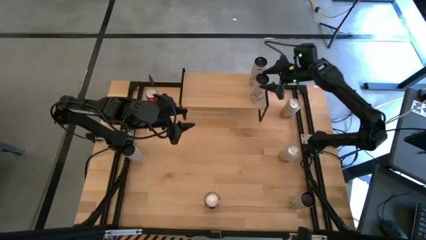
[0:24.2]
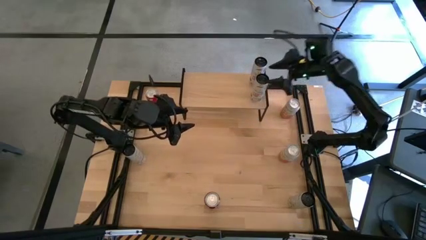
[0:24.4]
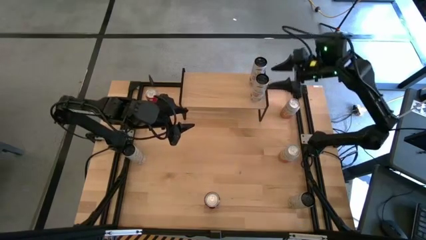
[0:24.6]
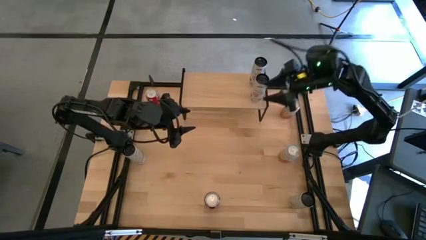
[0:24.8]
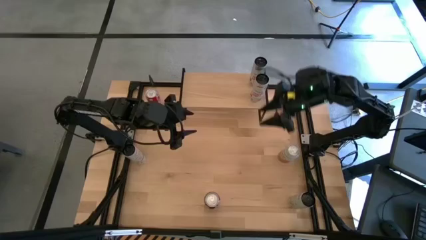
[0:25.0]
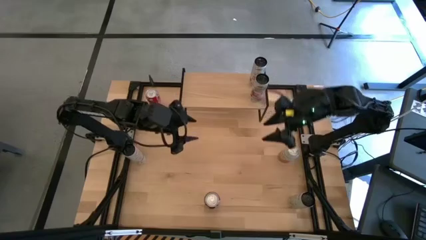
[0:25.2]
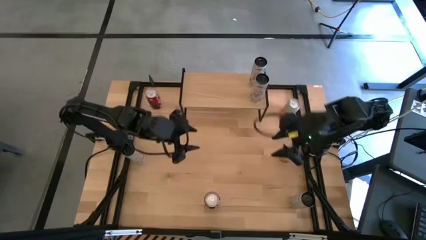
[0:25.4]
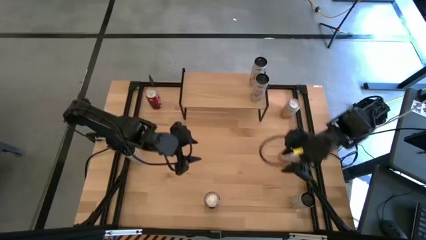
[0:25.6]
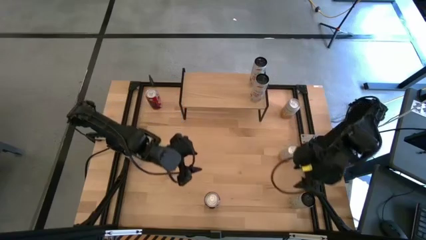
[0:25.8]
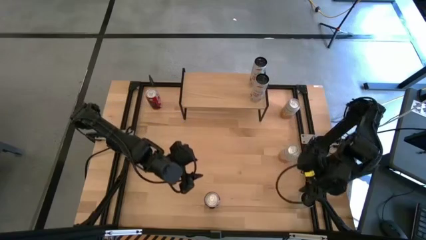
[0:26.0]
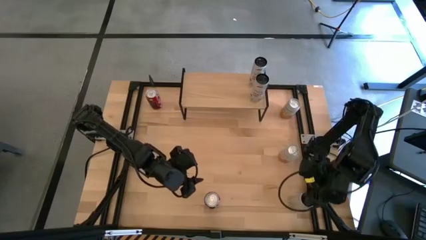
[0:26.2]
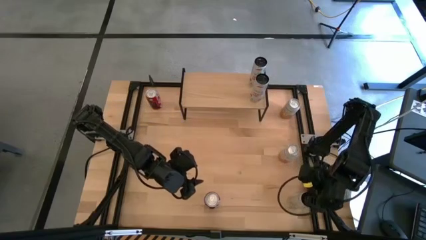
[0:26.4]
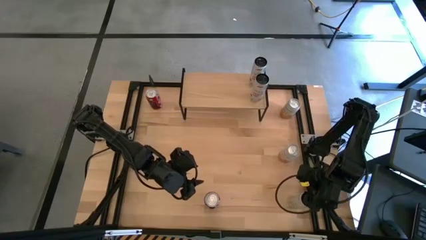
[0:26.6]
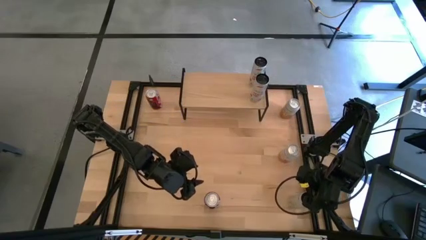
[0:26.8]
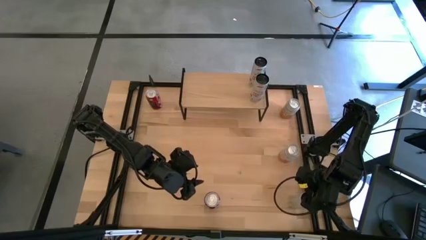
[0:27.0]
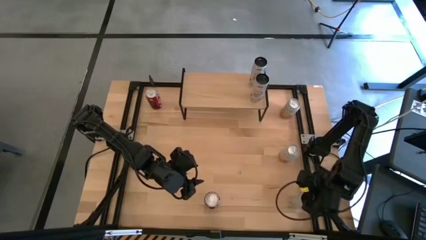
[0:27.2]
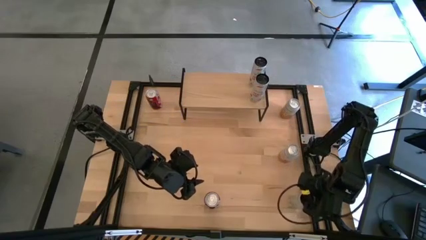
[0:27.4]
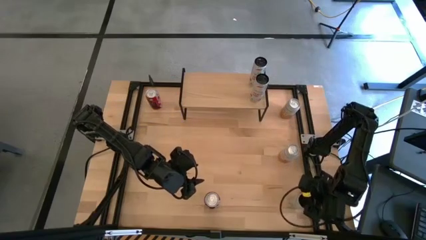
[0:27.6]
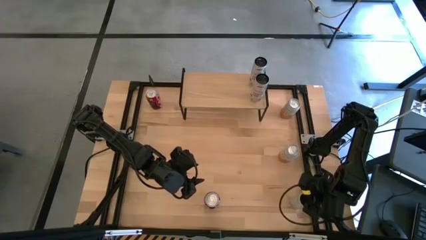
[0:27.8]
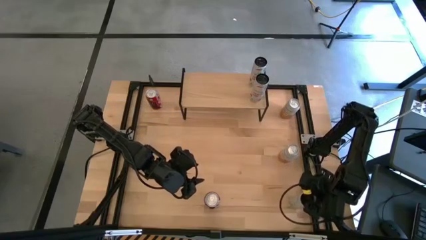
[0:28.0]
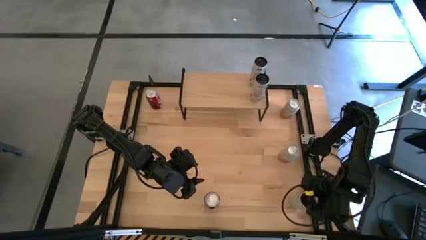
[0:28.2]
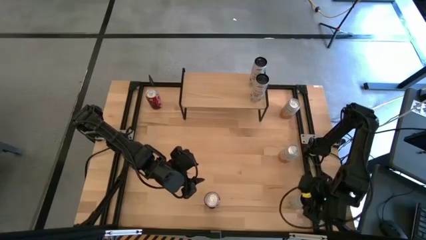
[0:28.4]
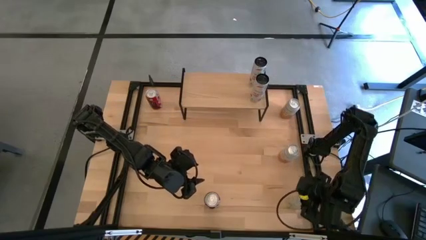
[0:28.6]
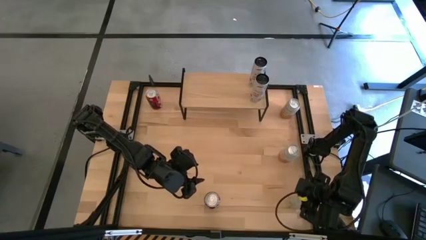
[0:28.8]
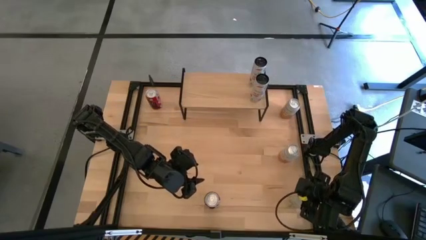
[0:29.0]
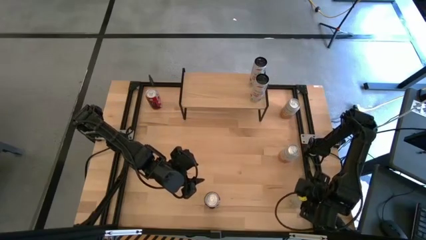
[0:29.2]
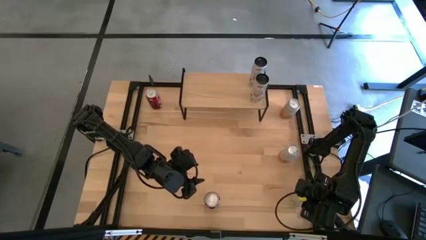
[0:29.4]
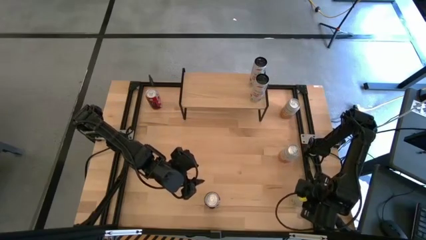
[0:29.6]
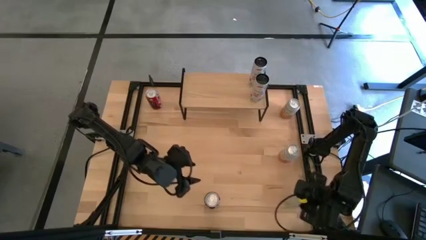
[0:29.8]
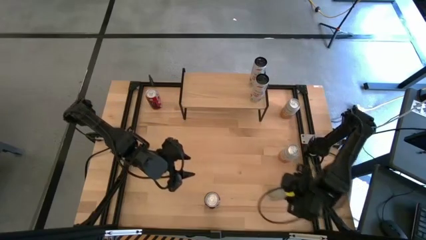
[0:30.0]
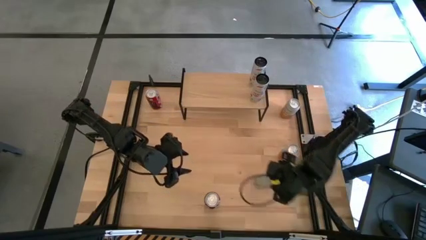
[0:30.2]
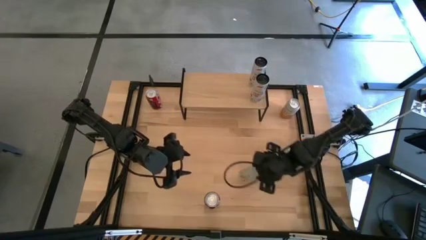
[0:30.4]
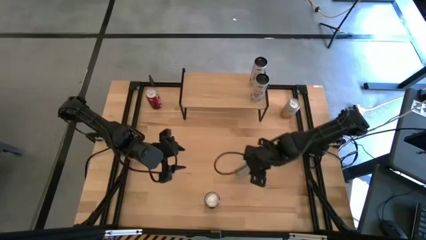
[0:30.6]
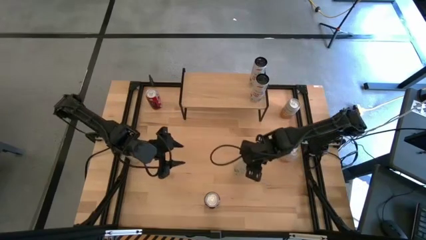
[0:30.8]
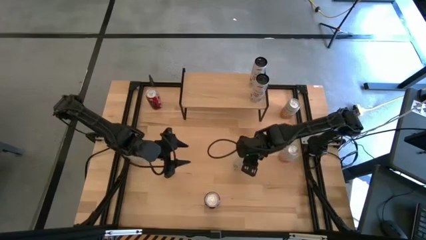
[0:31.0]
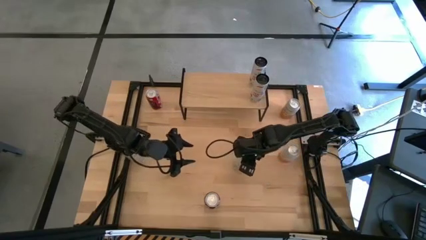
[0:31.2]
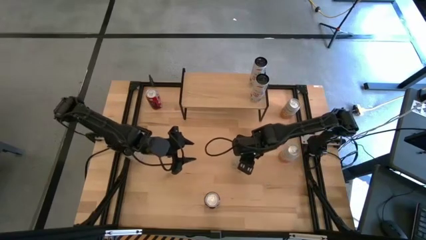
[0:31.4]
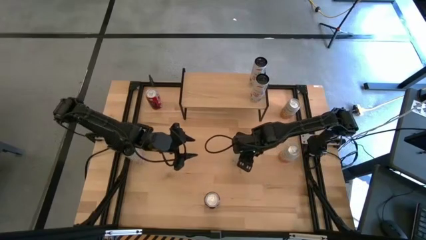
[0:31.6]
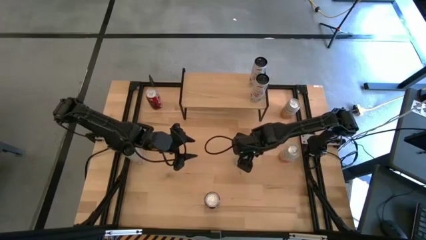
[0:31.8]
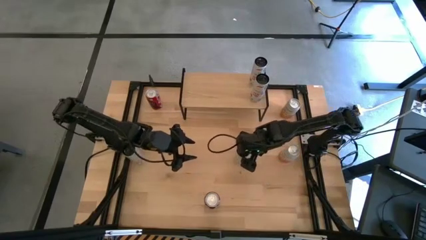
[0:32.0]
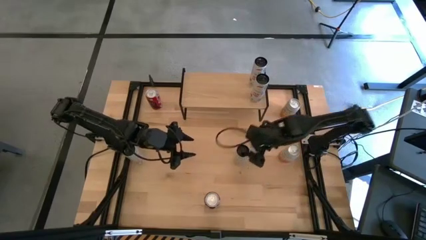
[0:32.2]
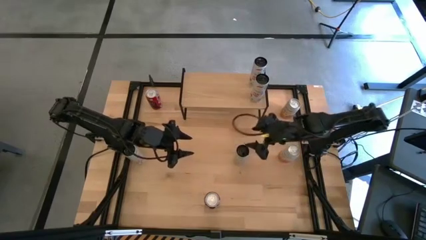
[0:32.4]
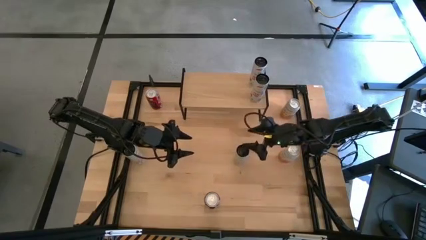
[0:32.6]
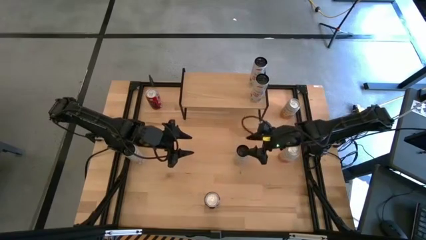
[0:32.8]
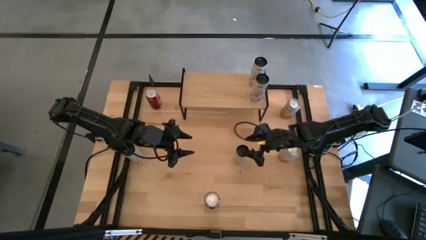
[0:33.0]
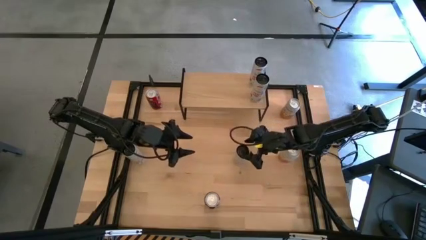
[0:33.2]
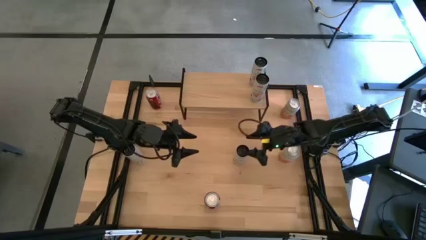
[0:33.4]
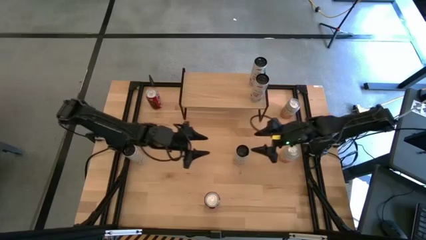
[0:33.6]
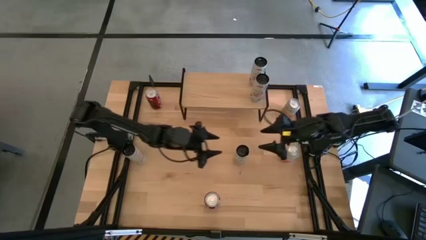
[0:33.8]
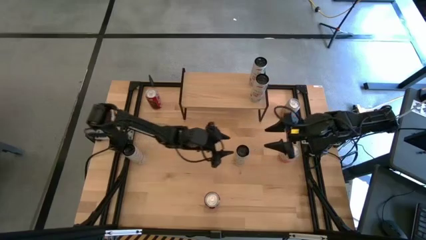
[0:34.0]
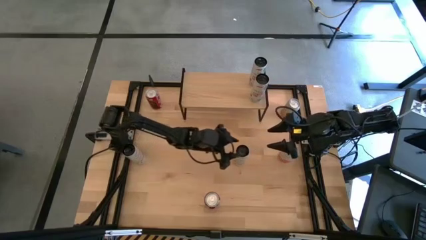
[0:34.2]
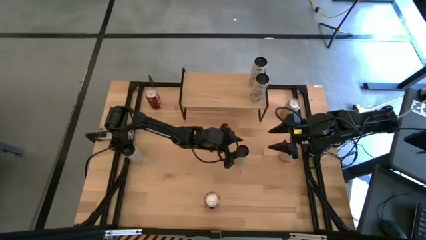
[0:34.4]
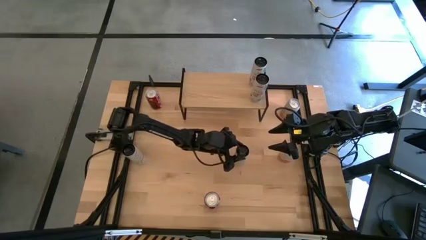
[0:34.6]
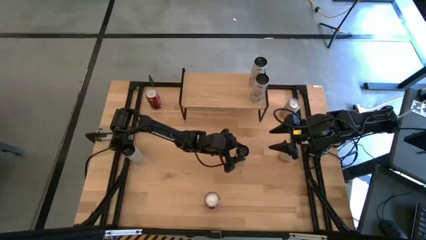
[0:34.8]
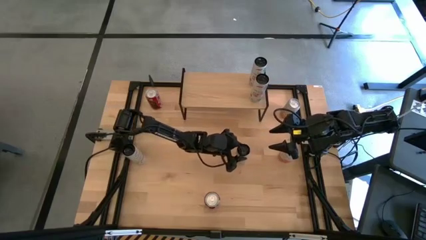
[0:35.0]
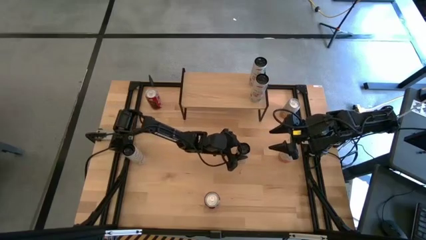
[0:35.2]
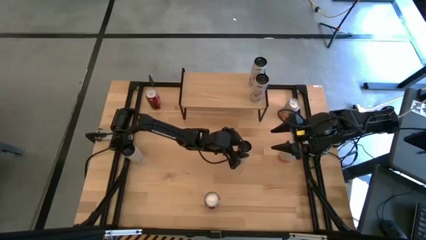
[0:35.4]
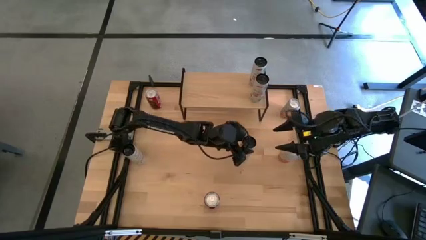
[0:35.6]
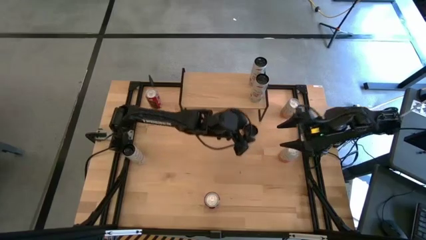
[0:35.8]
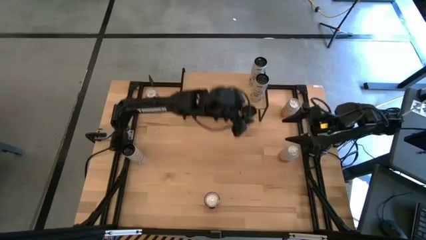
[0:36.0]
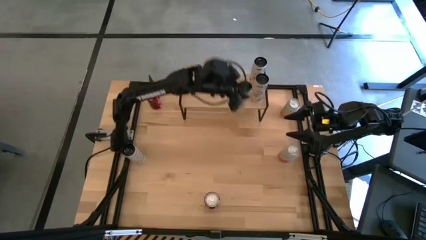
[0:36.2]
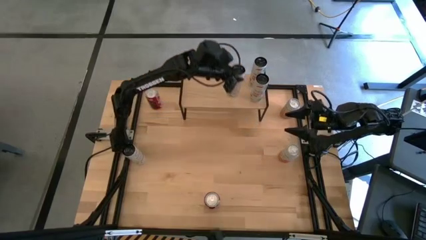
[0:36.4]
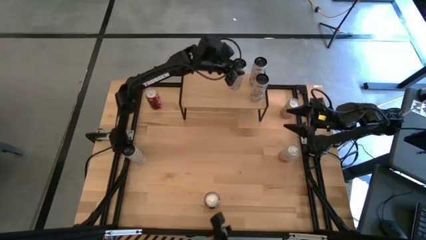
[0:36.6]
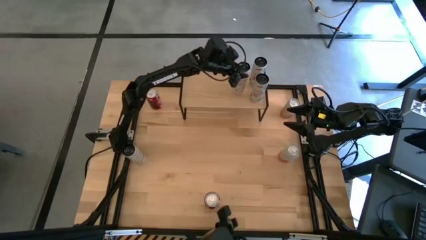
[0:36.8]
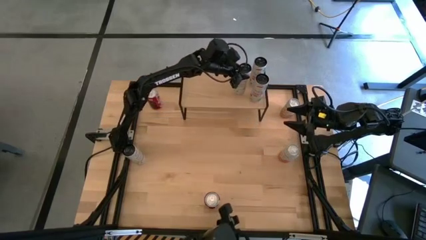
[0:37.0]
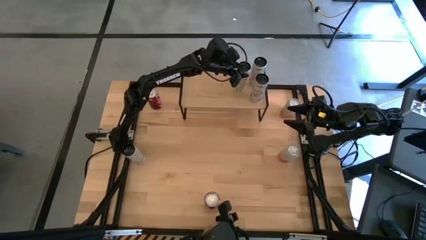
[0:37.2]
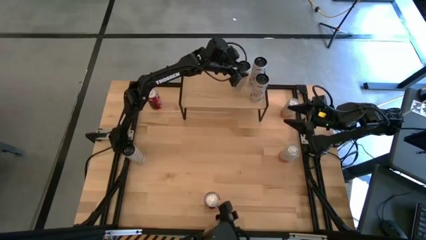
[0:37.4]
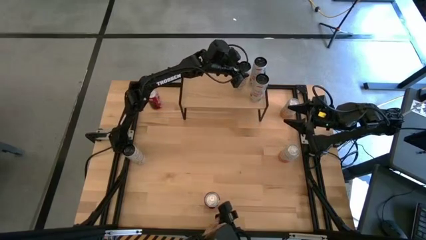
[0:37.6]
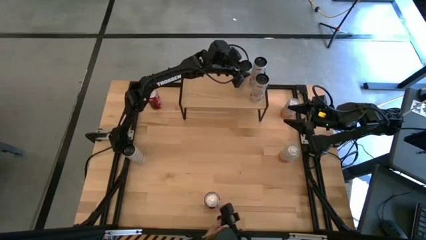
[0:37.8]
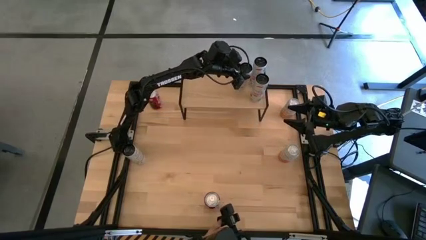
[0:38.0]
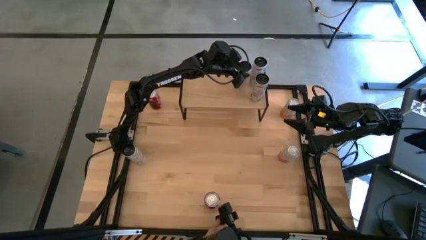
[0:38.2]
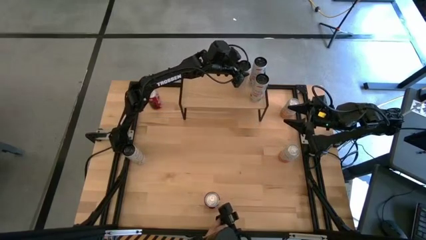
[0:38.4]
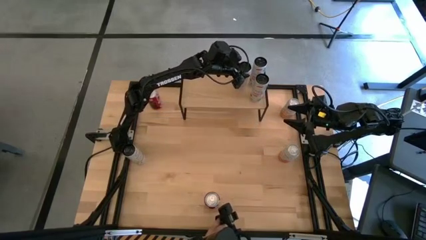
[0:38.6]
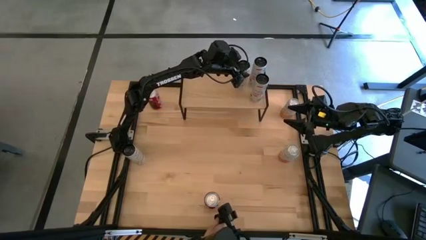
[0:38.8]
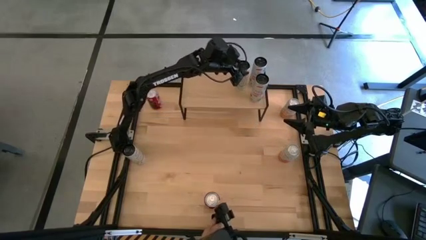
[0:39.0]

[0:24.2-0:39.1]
Task: Place canned beverage on shelf
Put the bottom white-yellow soda can on the shelf

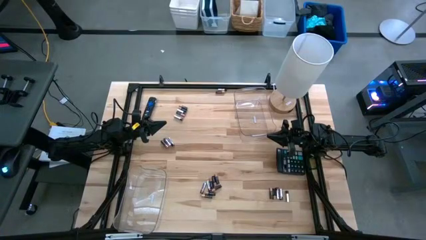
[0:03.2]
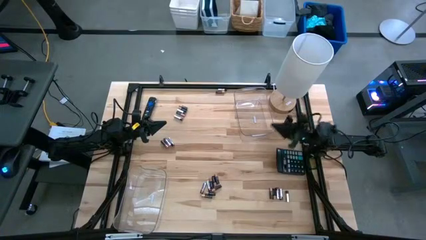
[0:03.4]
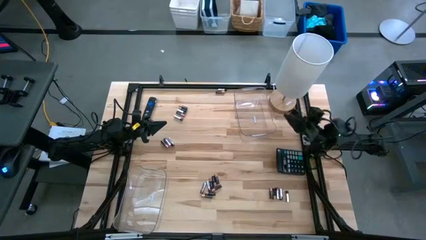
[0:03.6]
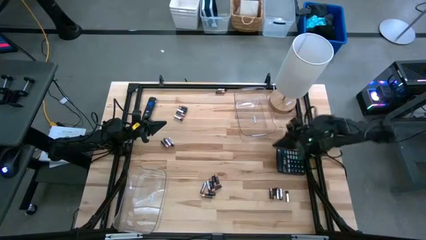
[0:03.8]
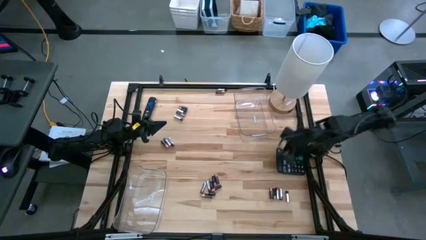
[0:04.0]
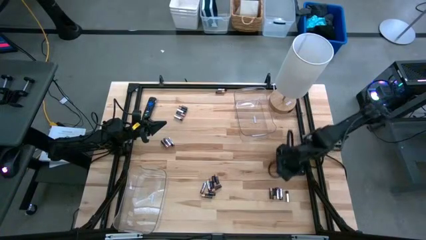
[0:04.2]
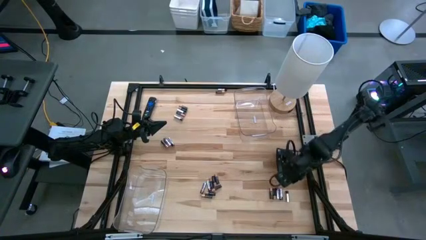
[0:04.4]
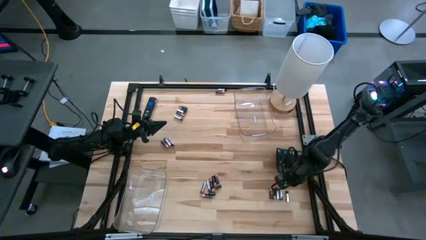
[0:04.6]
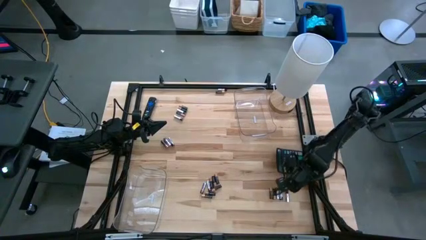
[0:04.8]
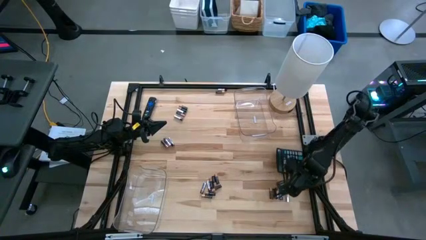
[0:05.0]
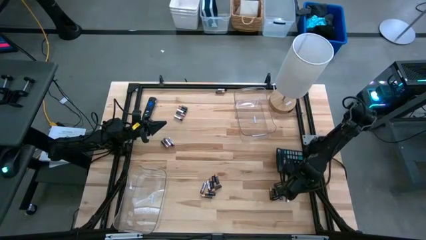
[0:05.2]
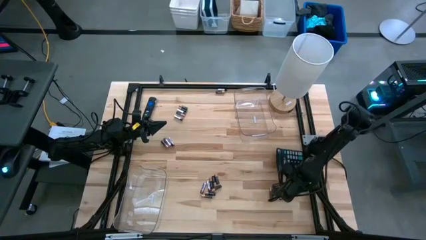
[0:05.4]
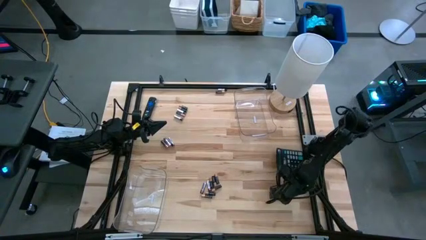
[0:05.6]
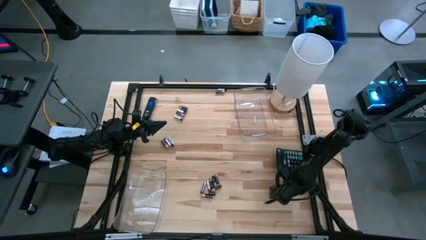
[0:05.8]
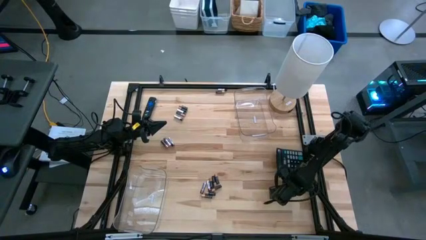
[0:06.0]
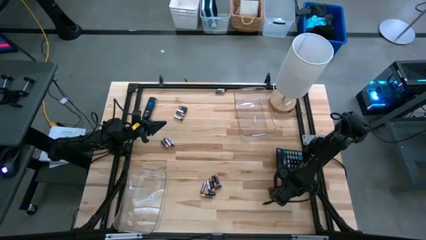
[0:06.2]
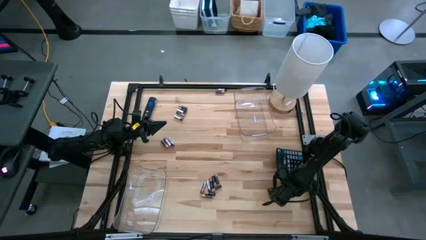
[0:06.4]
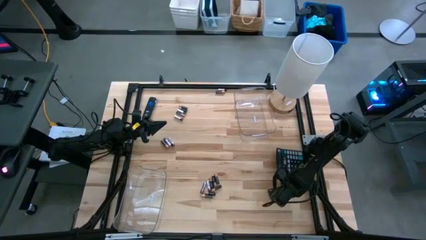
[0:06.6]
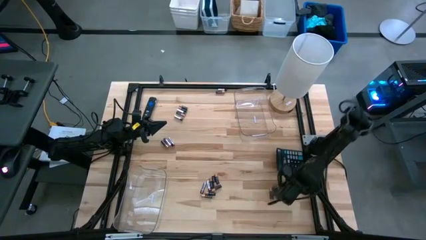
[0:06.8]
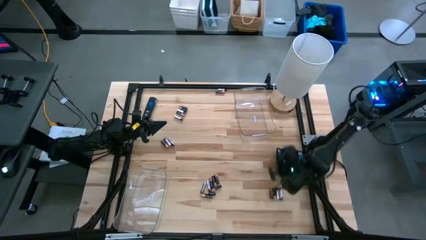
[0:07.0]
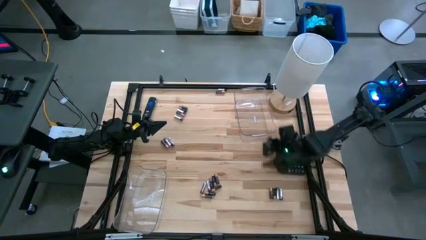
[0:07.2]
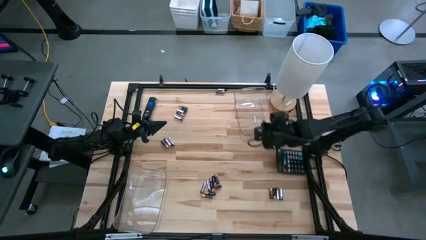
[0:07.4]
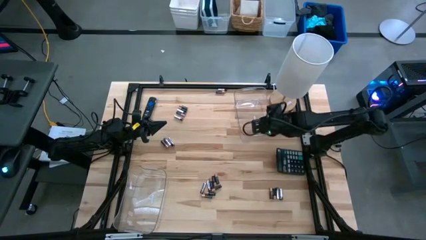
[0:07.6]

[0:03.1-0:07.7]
Task: Sort batteries
Put the silver battery into the right transparent bin
